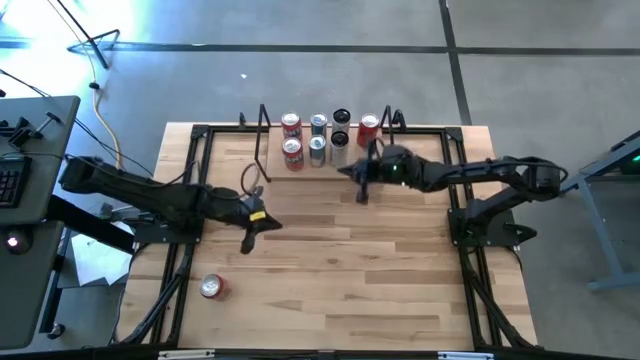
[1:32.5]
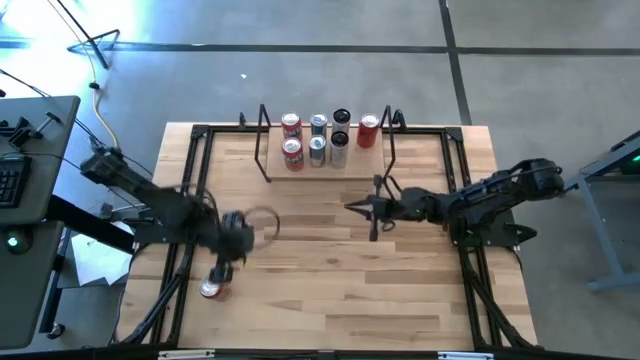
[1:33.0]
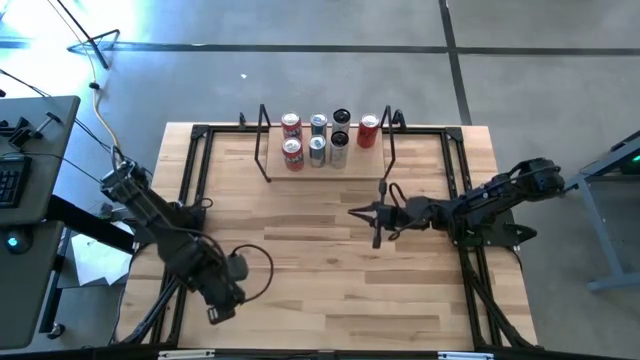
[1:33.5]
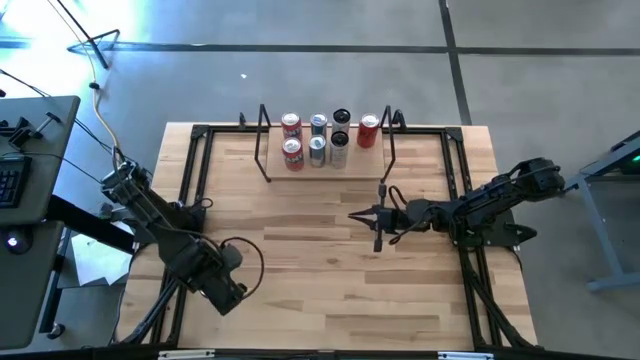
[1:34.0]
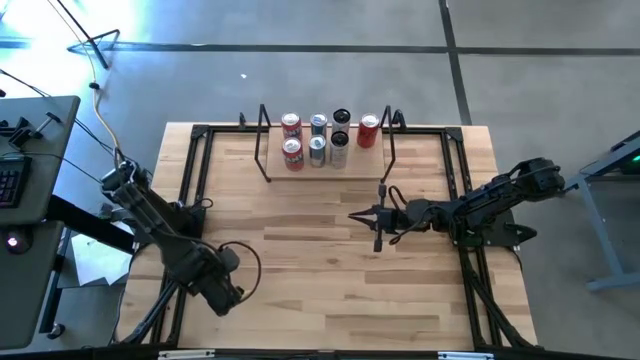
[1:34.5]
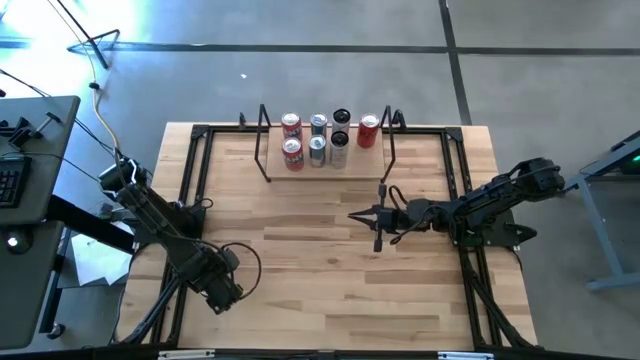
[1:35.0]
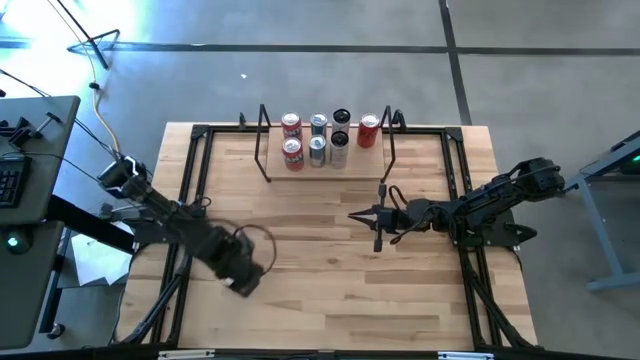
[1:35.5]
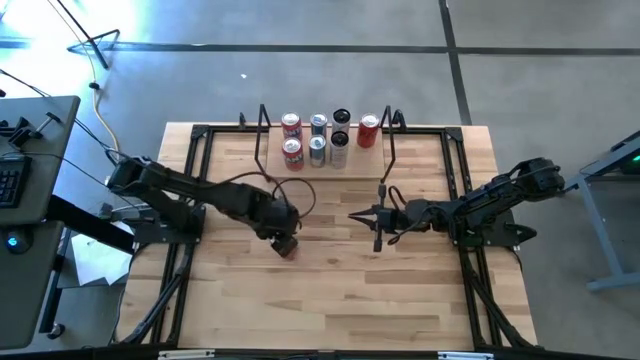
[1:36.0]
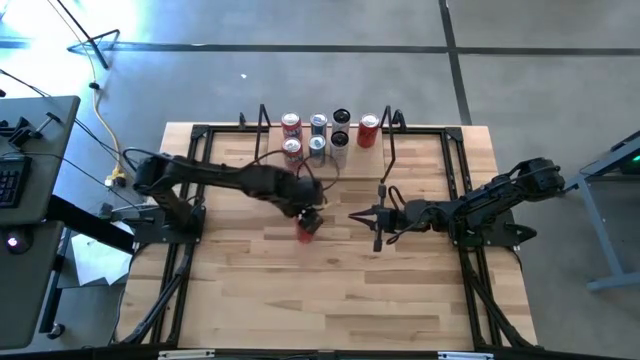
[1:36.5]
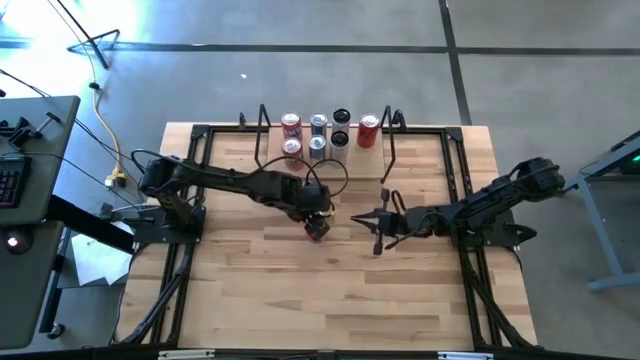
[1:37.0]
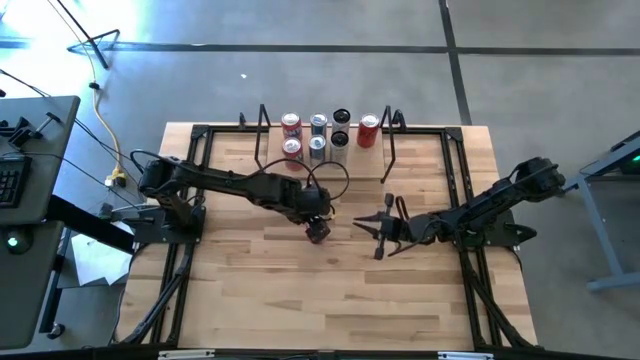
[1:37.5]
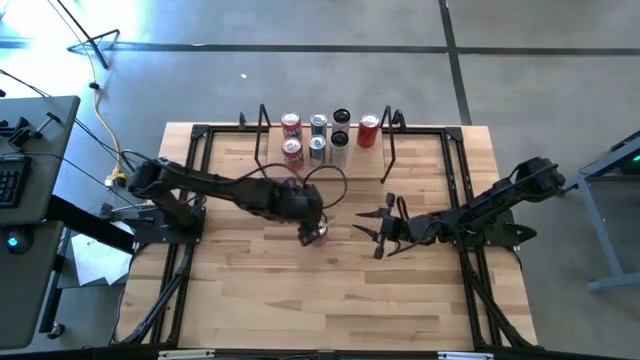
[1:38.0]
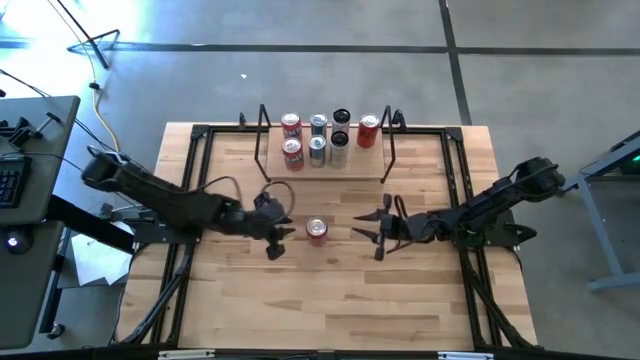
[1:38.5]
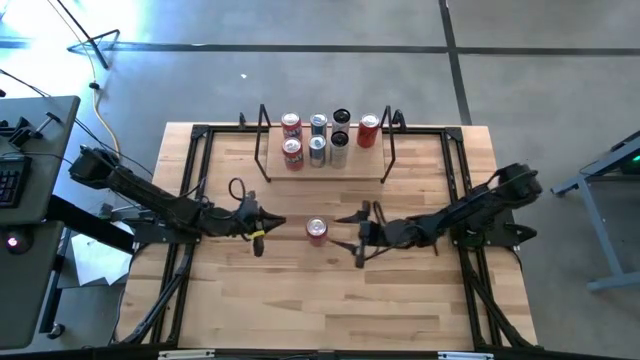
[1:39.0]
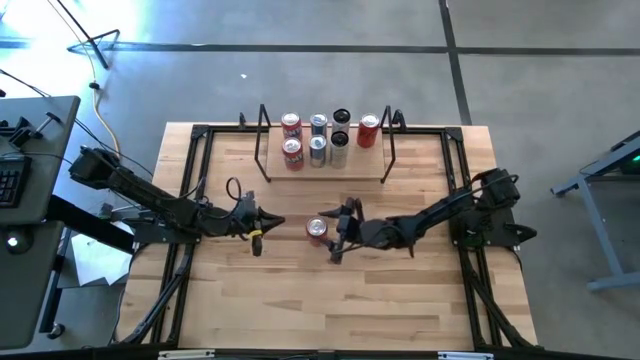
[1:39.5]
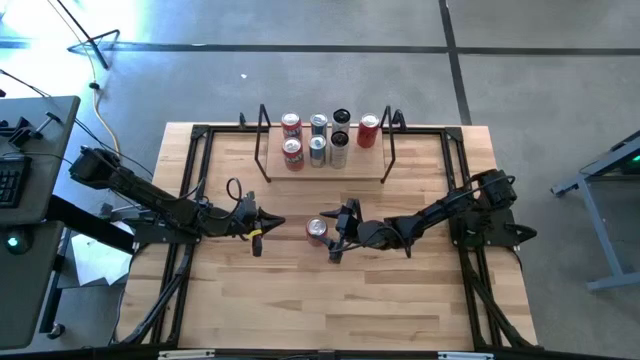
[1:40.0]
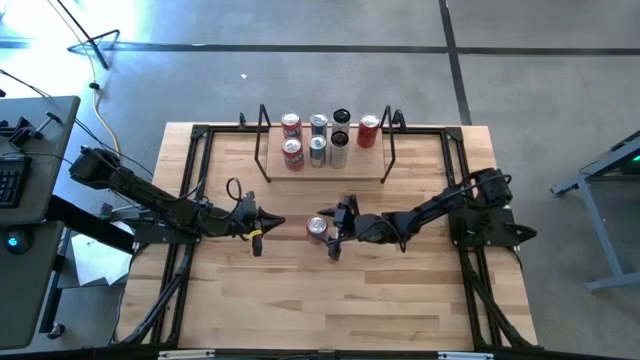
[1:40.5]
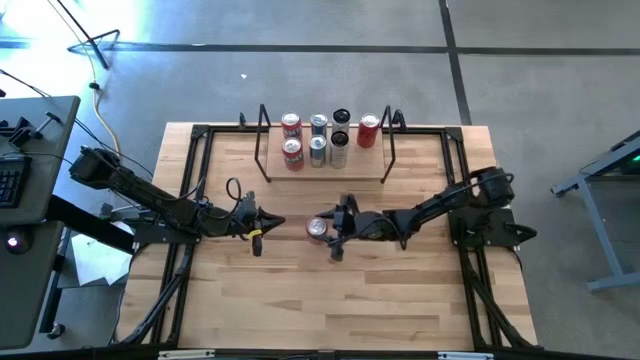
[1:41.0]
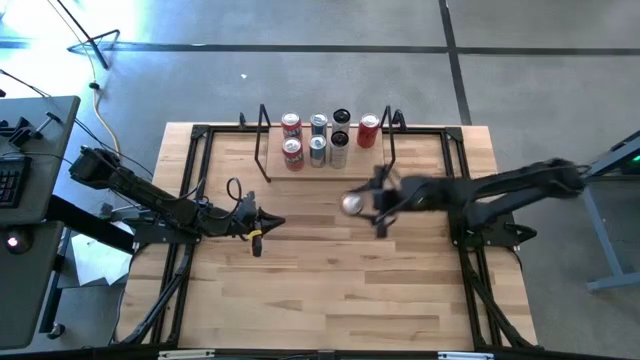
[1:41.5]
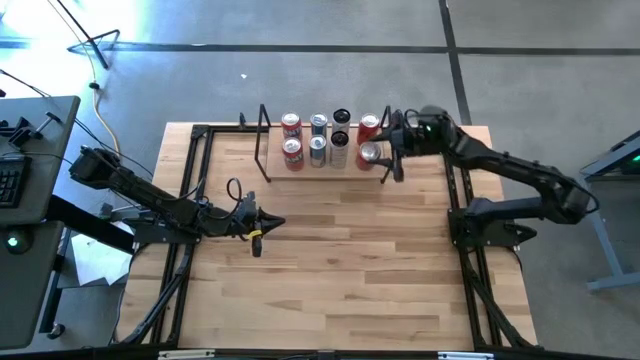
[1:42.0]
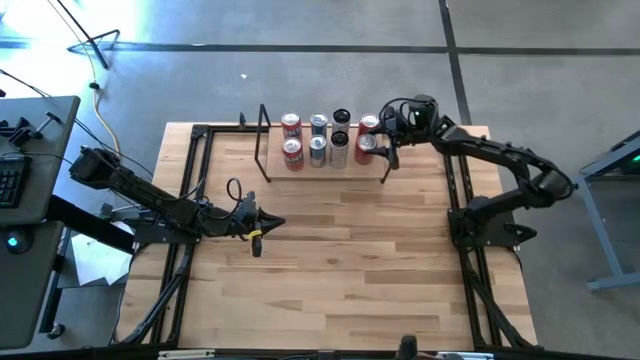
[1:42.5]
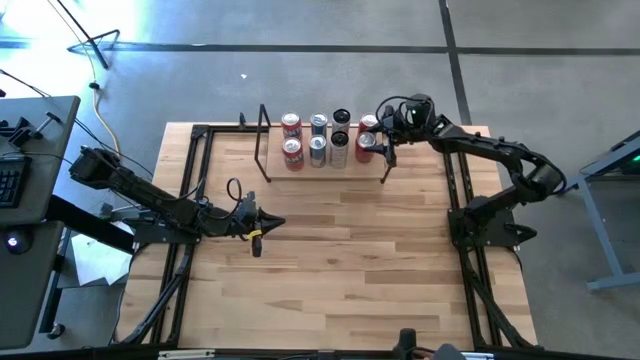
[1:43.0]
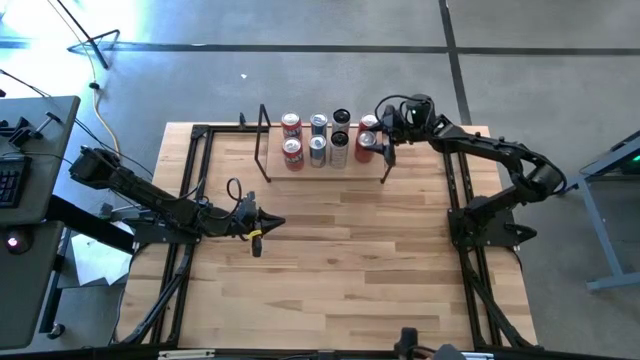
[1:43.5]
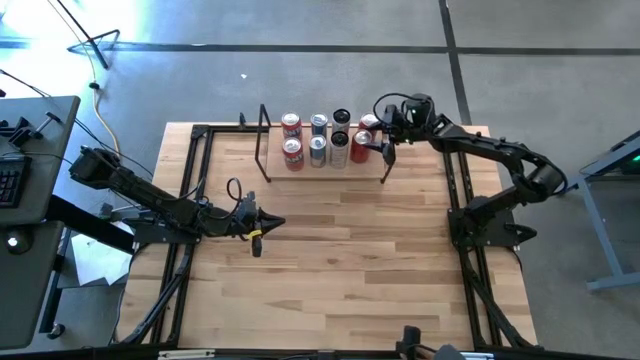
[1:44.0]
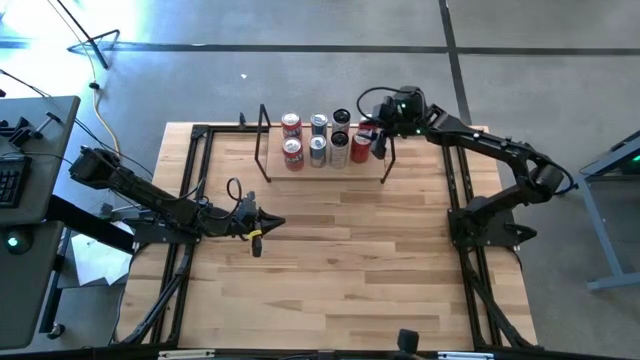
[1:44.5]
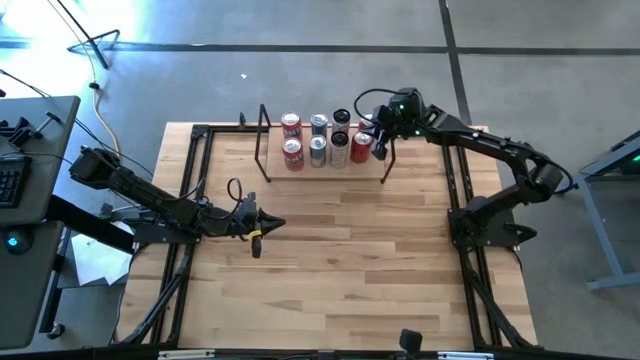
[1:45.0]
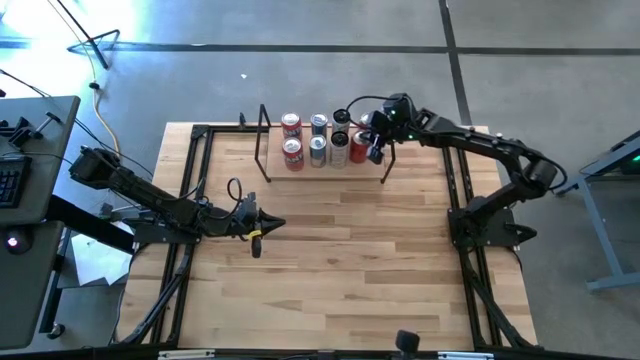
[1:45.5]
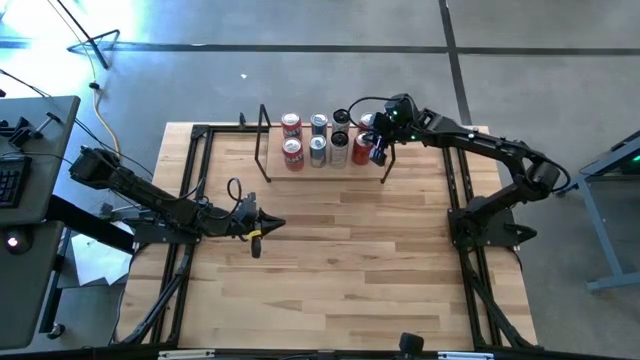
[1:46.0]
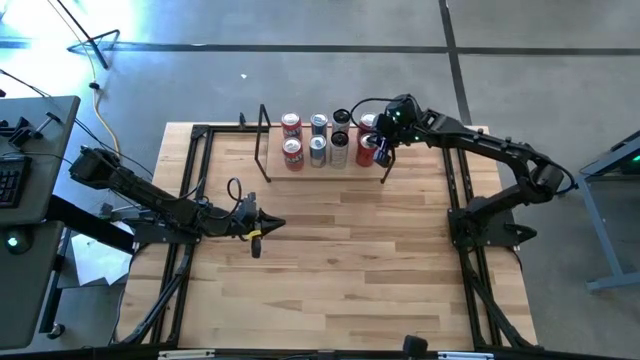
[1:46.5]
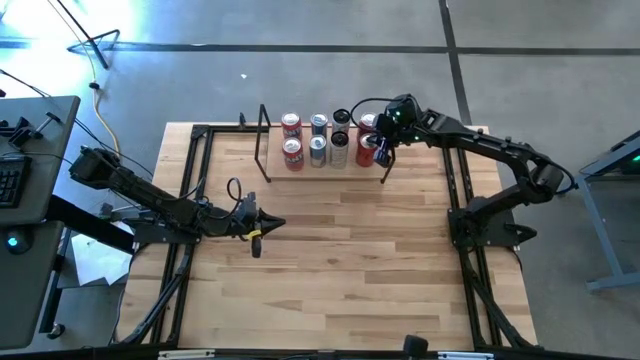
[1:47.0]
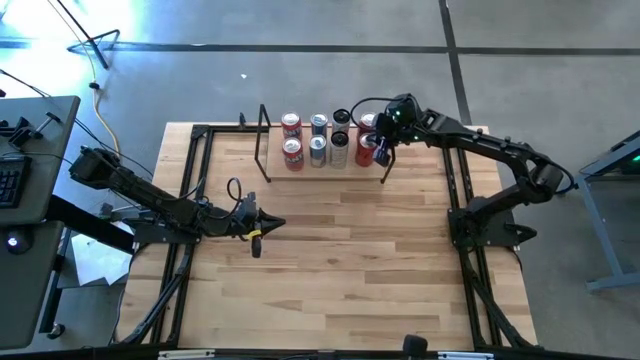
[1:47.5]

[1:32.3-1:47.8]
Task: Place canned beverage on shelf
Put the red black soda can on the shelf aligned with the other red black soda can

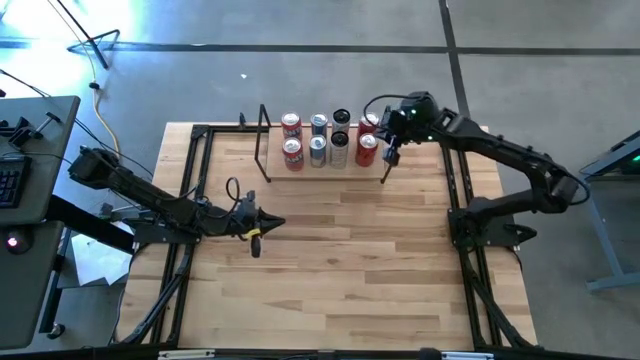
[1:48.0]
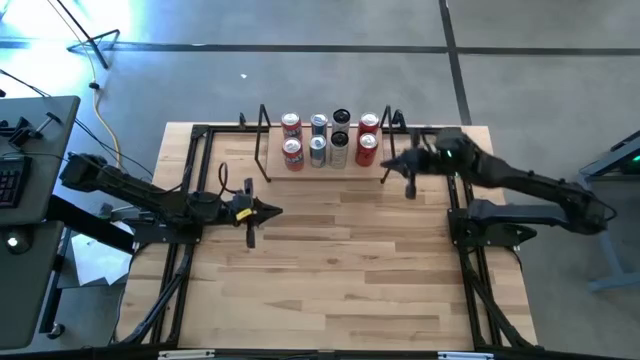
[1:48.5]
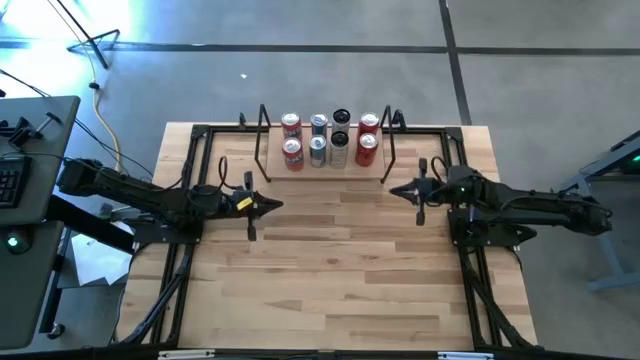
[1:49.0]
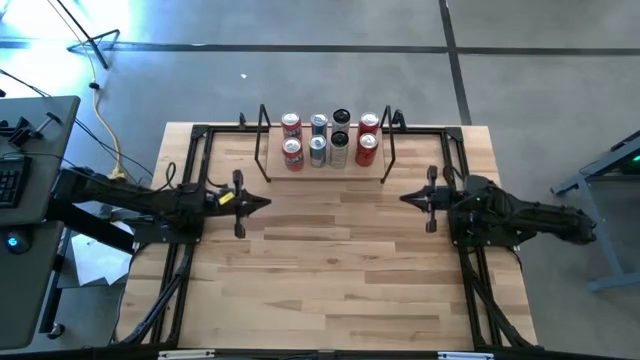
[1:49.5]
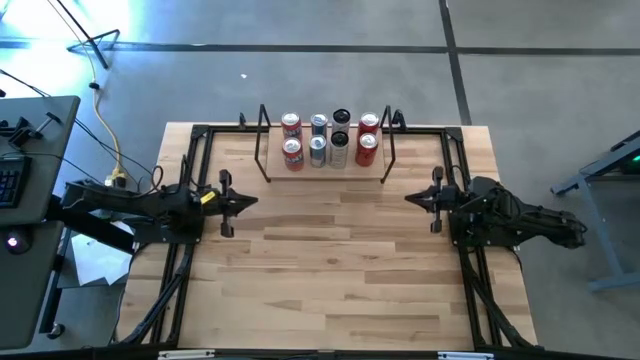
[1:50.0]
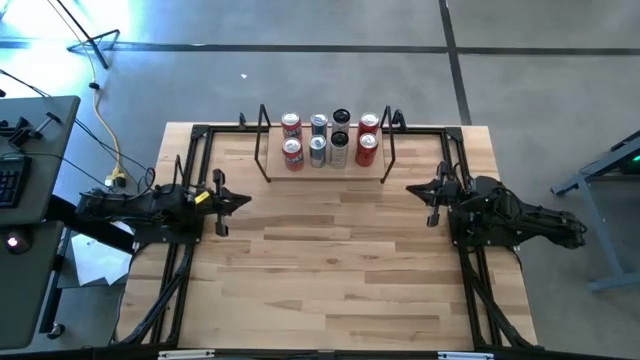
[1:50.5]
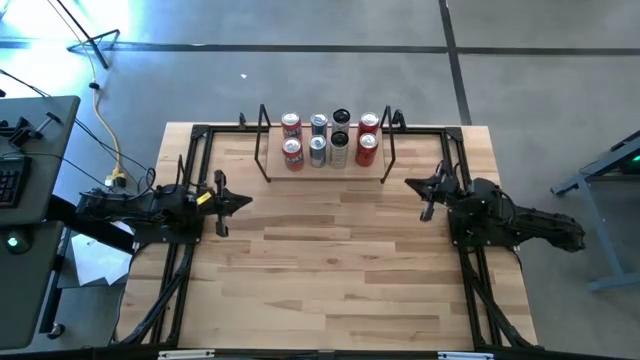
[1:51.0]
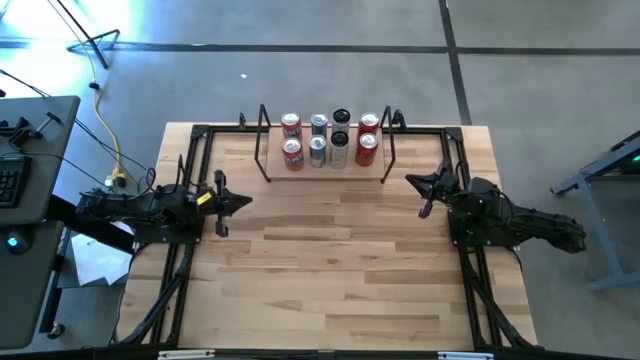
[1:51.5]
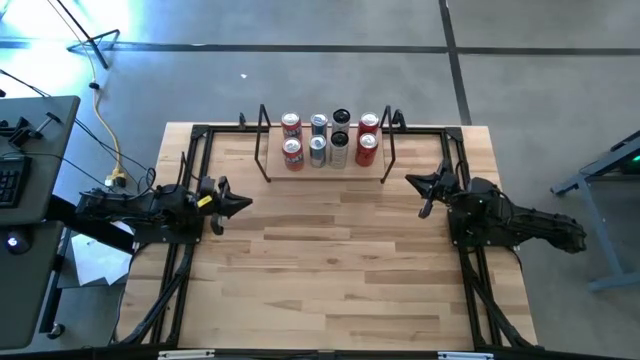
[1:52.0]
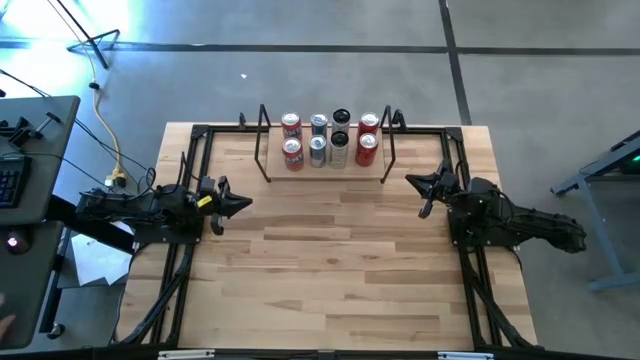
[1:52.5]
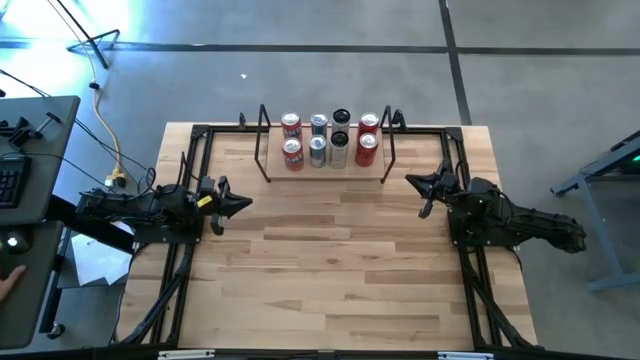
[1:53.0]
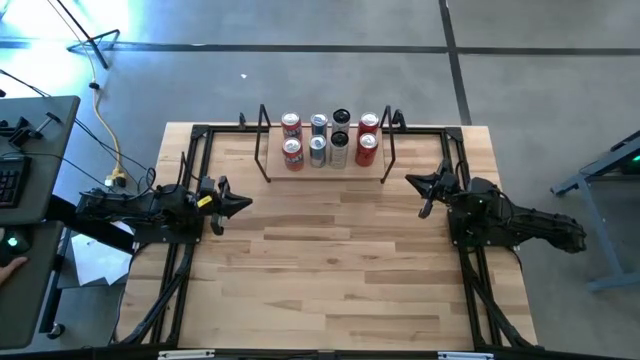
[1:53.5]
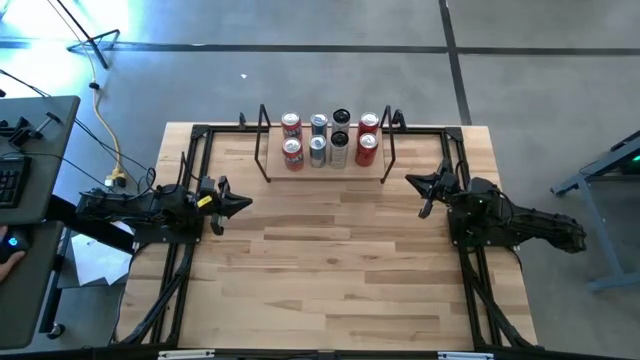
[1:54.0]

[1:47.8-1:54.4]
Return to Home Position
